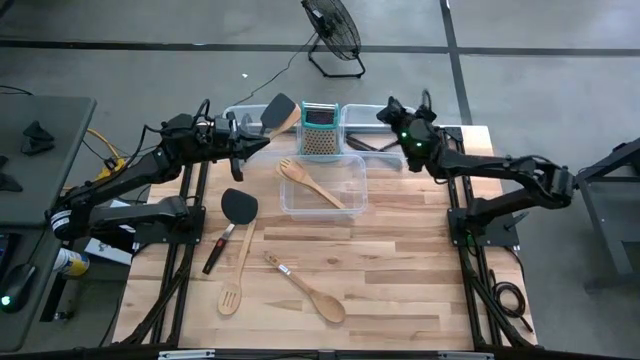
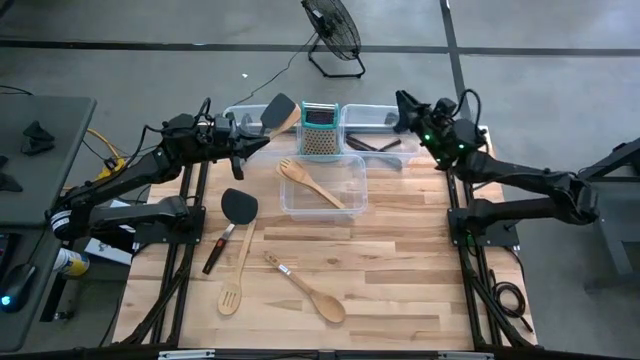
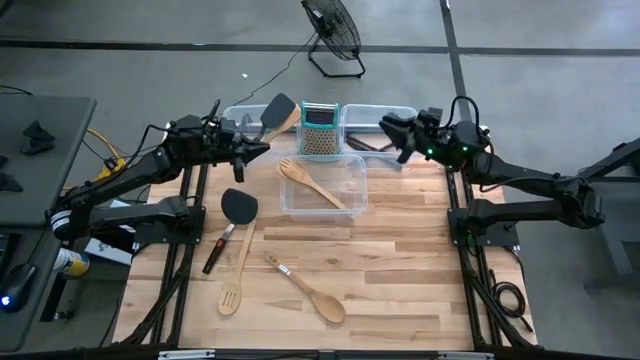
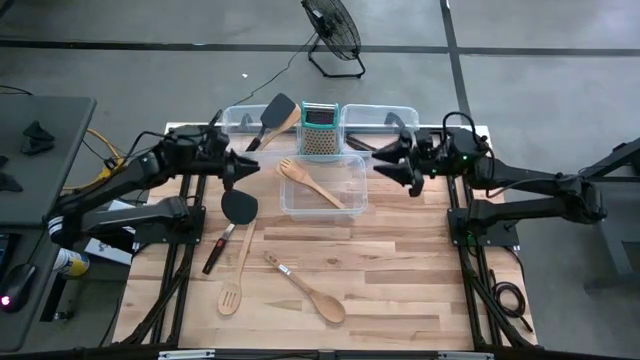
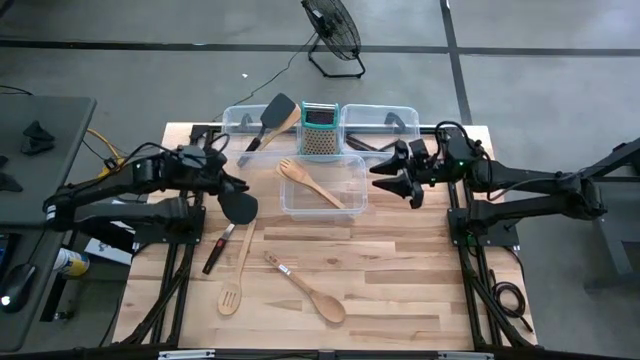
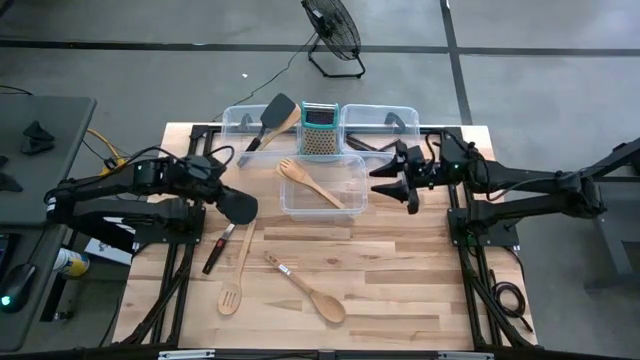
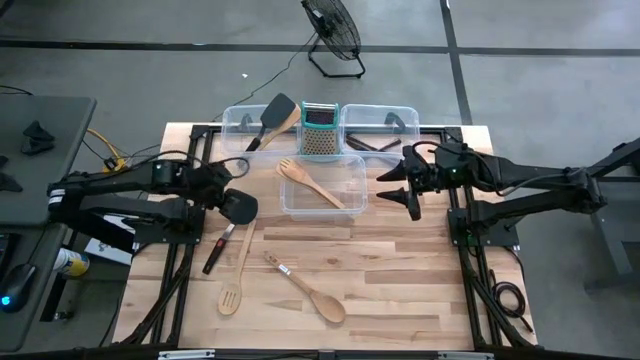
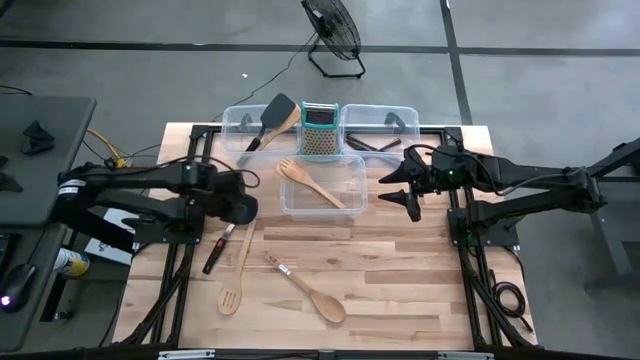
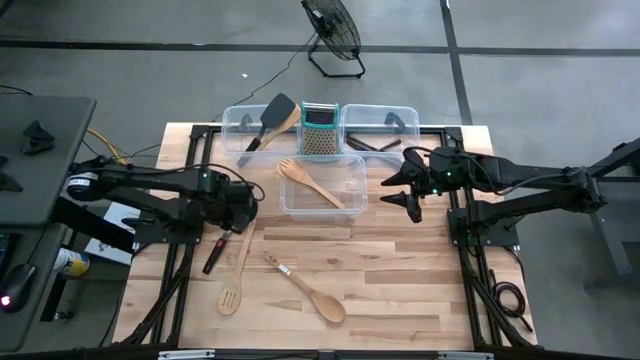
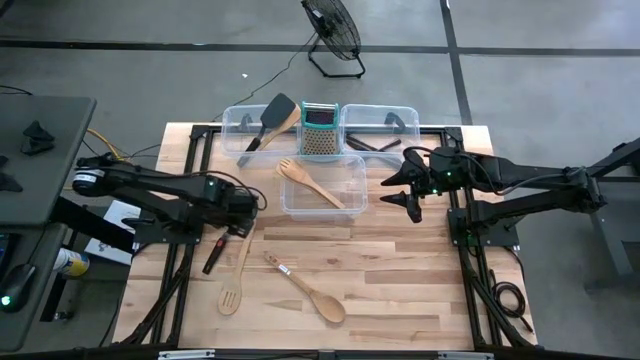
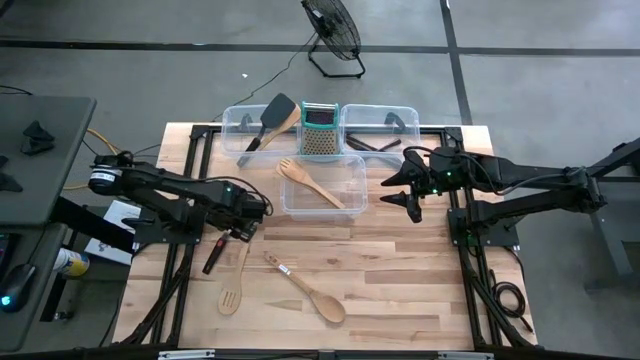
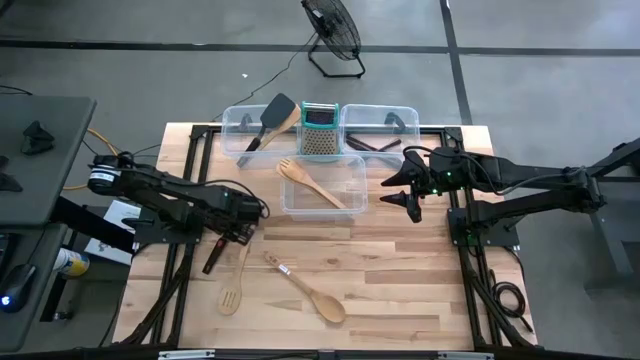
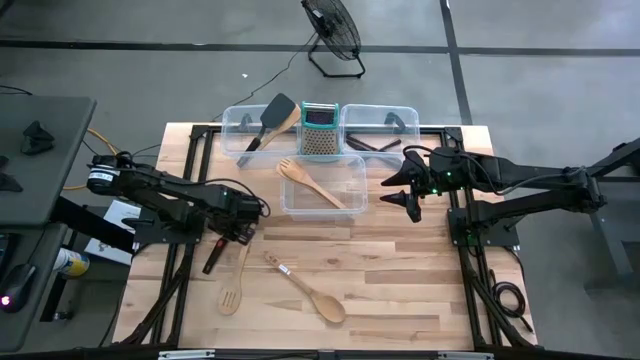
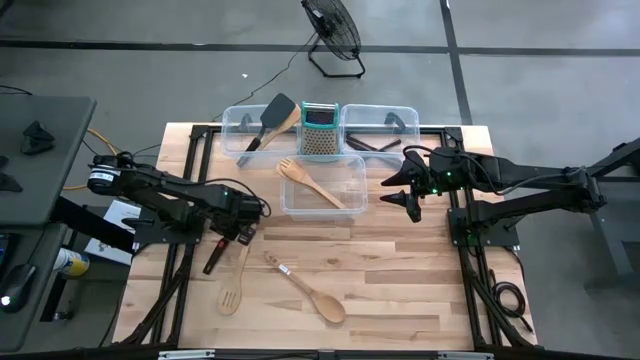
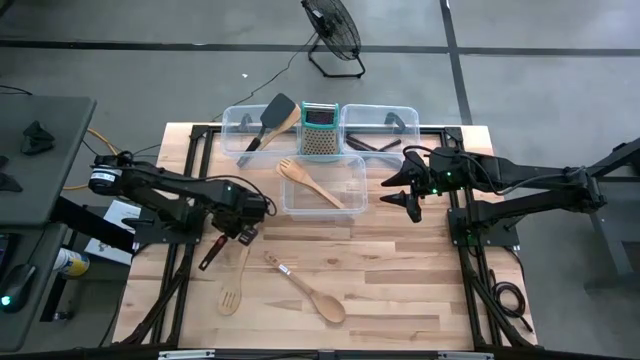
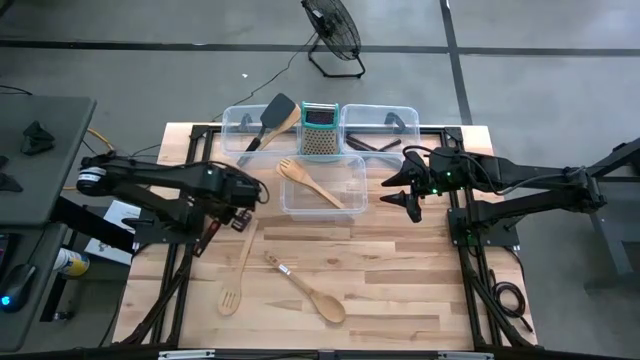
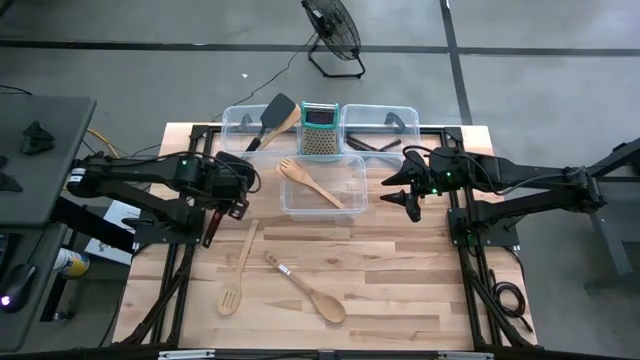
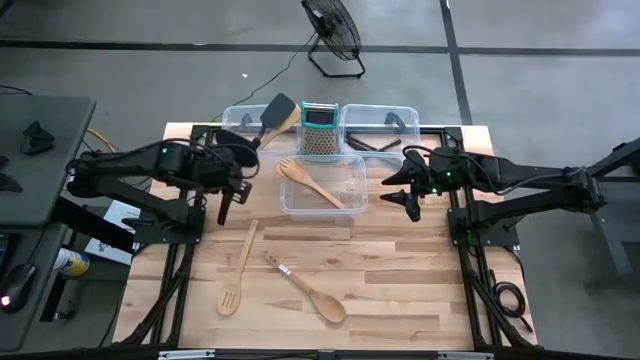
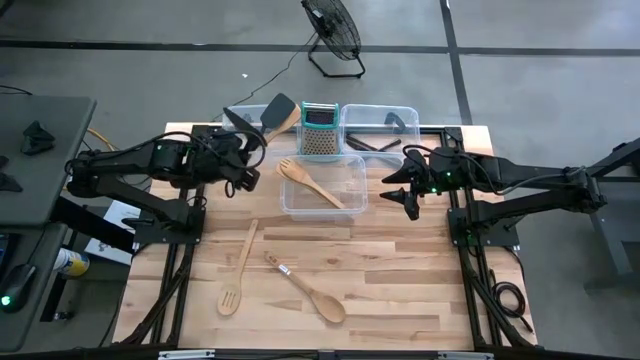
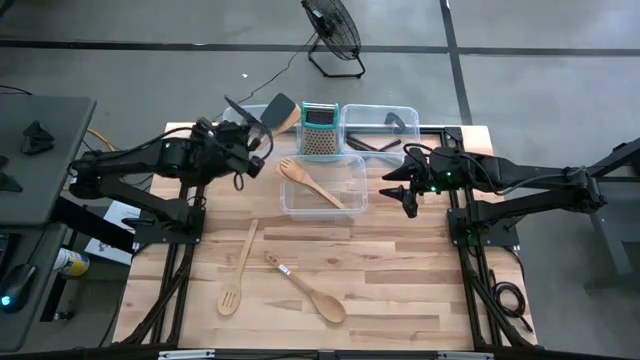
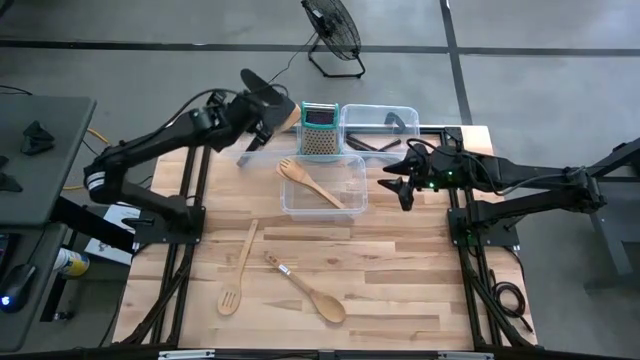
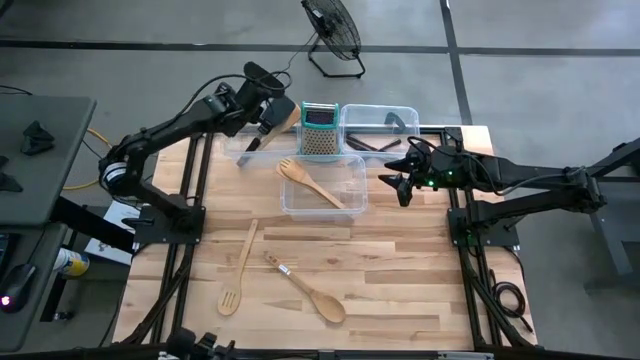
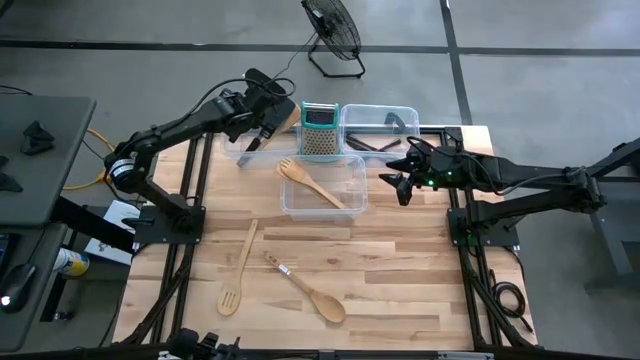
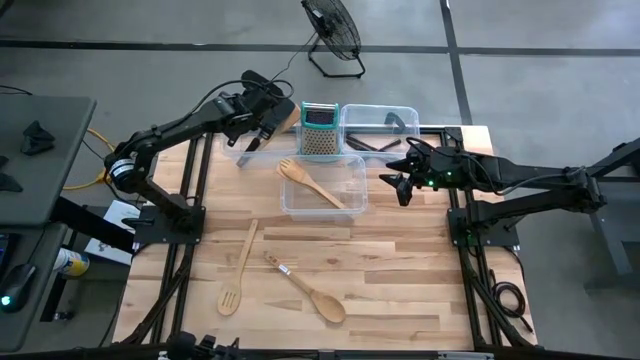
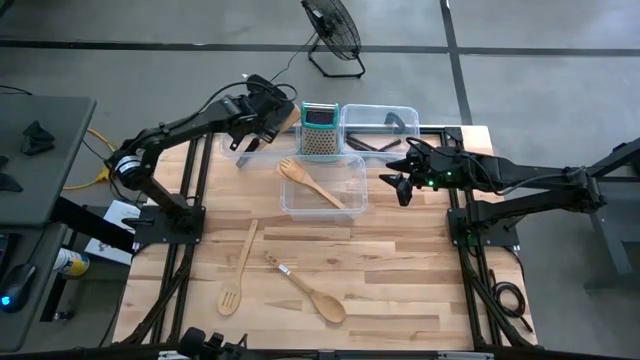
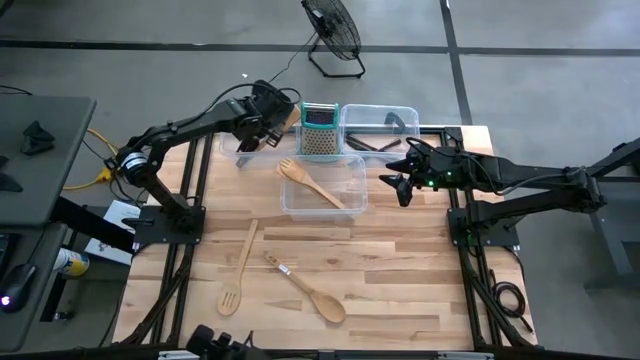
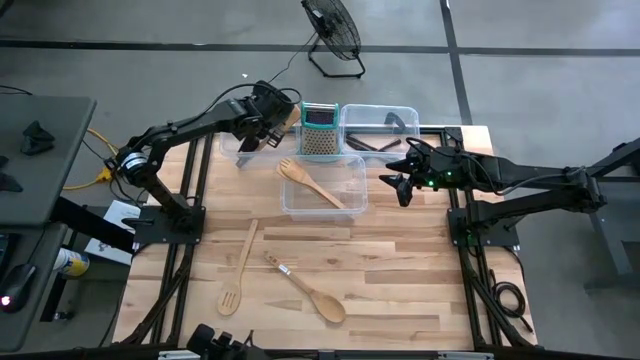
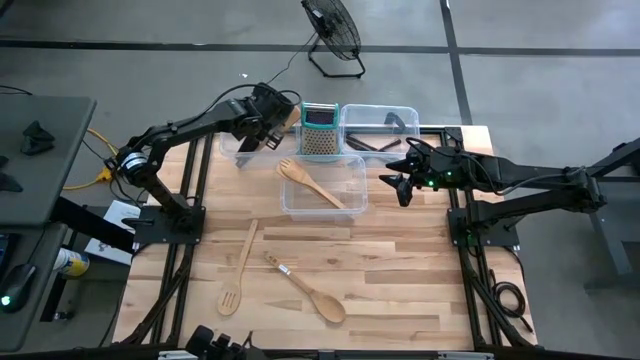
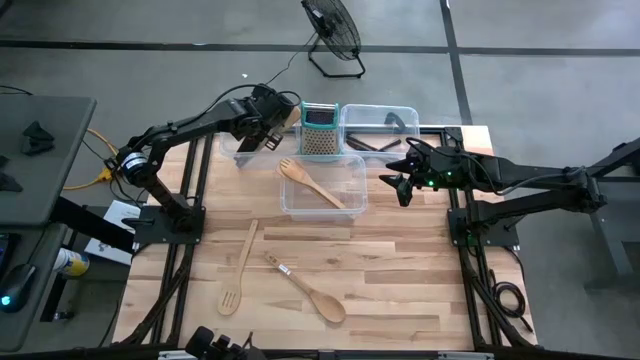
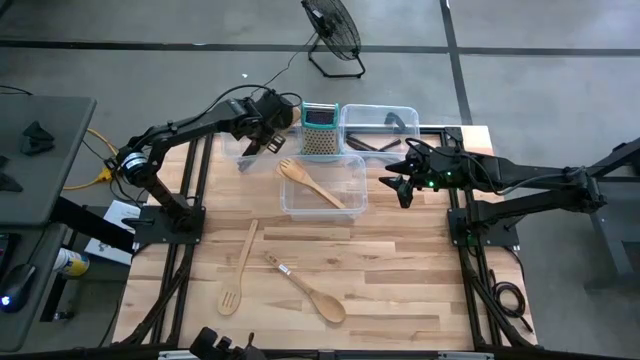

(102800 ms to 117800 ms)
Task: Pick & Place Kitchen Items
Put the black spatula into the left transparent bin

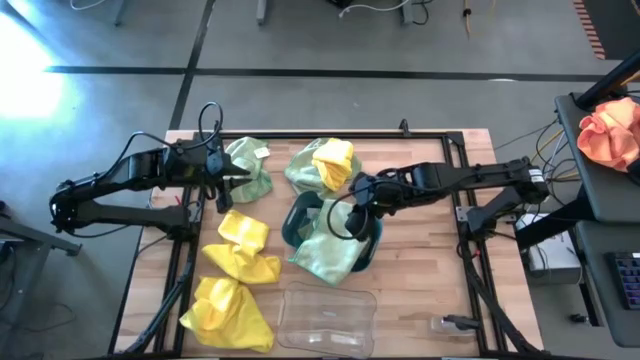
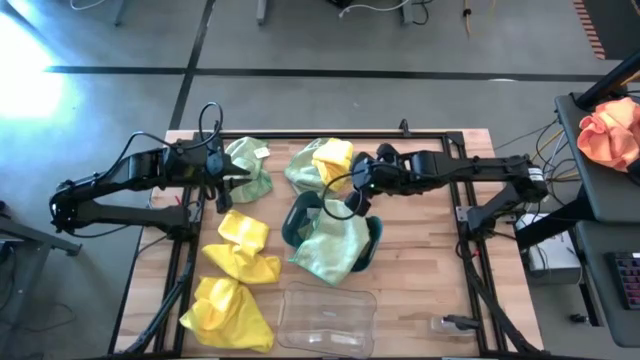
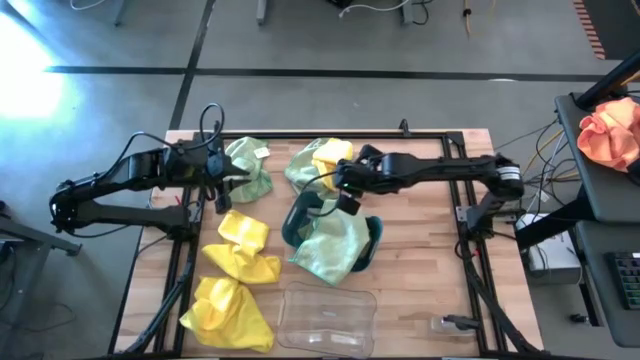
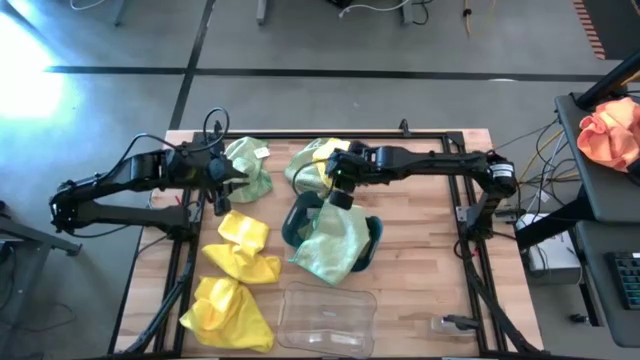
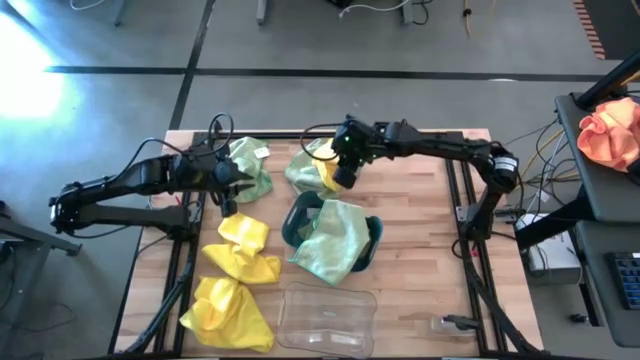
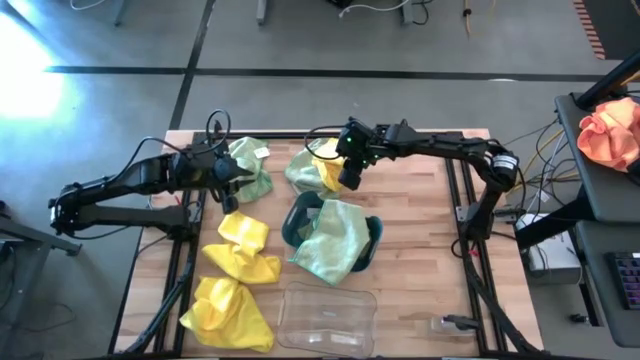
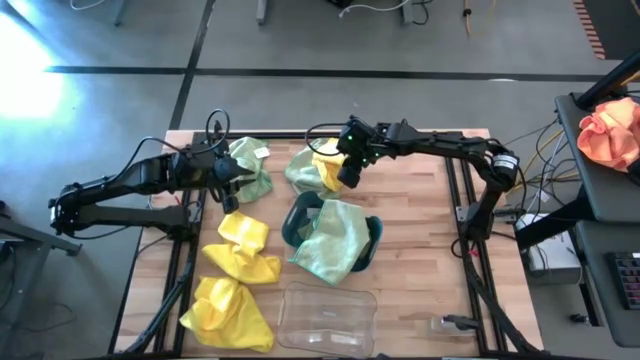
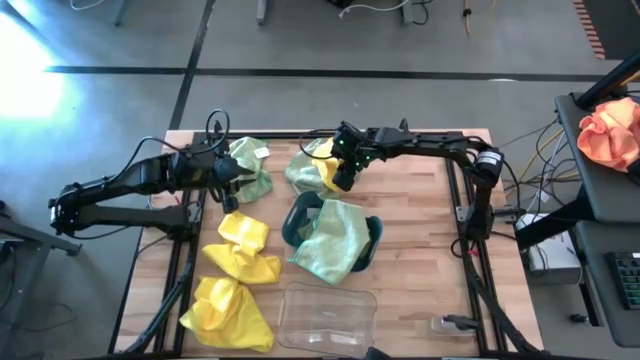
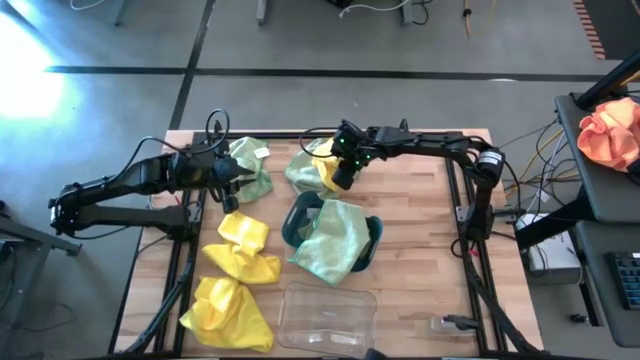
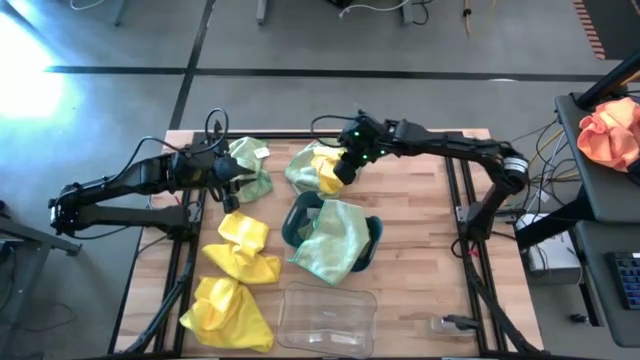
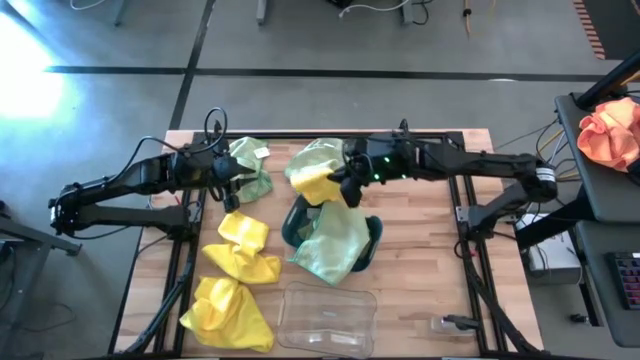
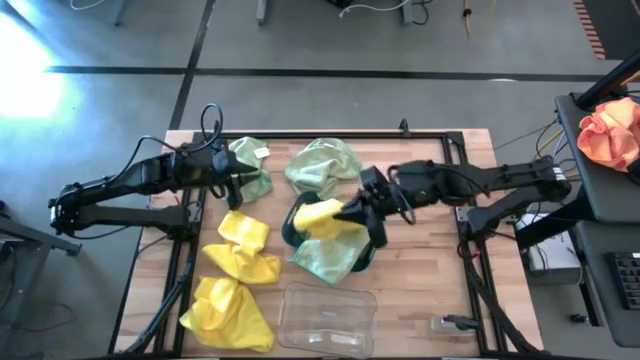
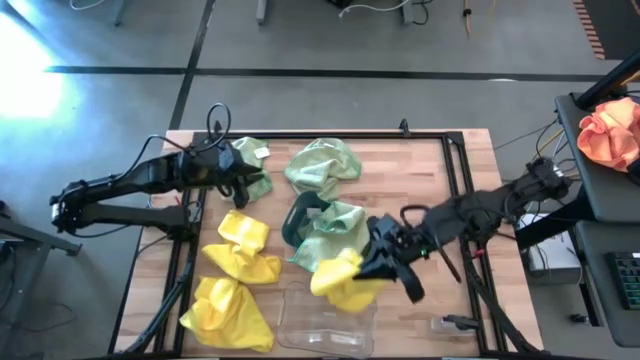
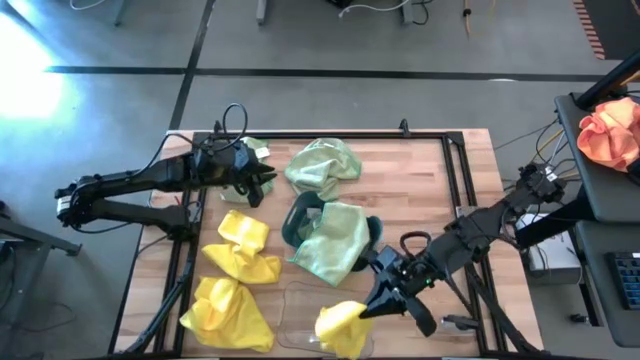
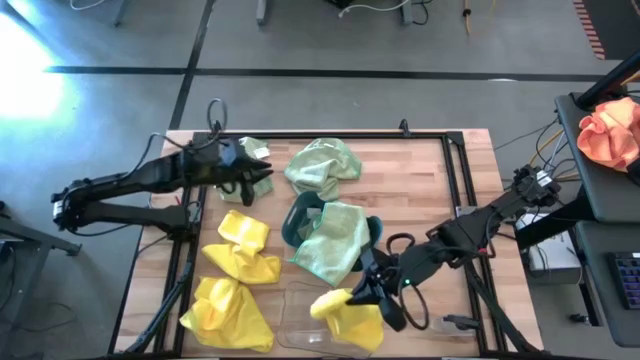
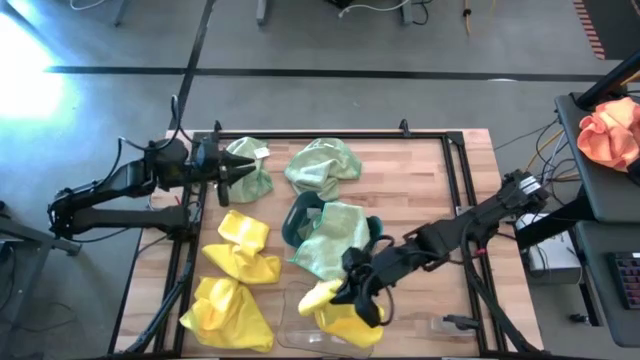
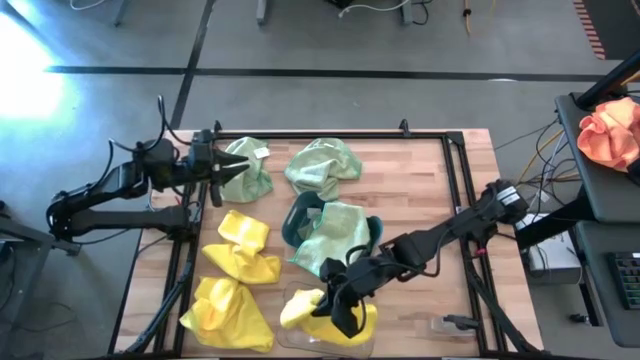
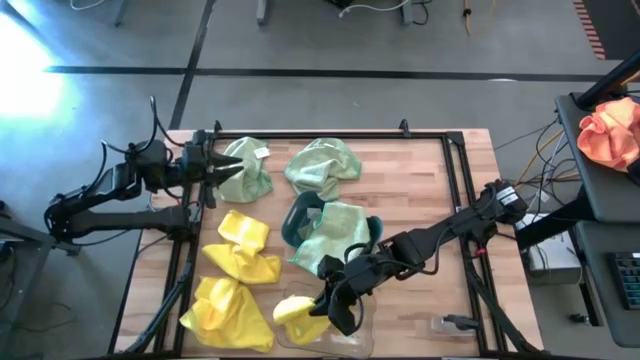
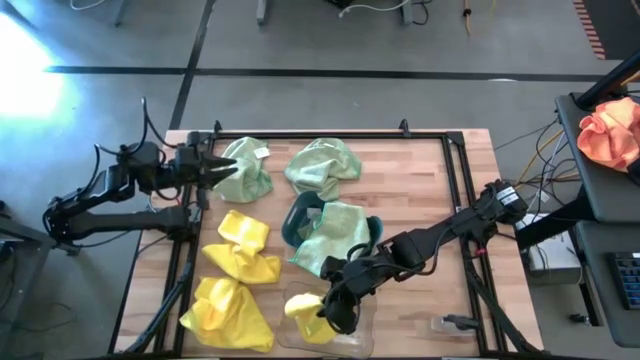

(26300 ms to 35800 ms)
Task: Sort microfiber towel by color & place in baskets
Put the top yellow microfiber cloth into the transparent bin
